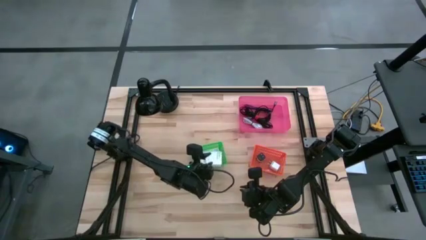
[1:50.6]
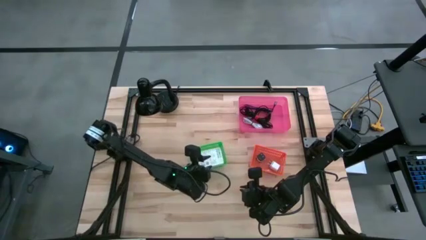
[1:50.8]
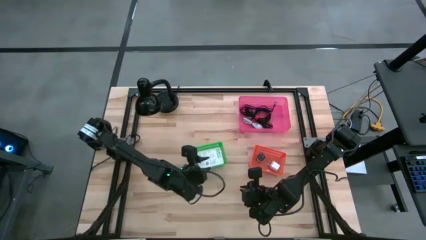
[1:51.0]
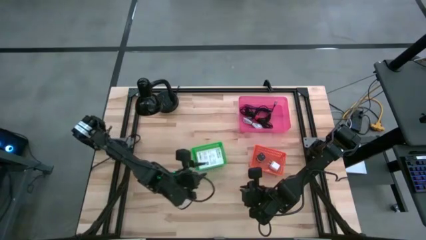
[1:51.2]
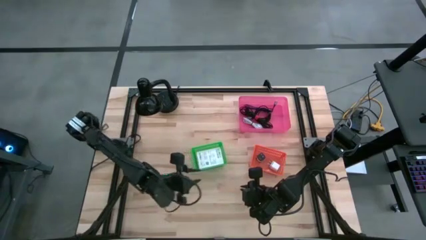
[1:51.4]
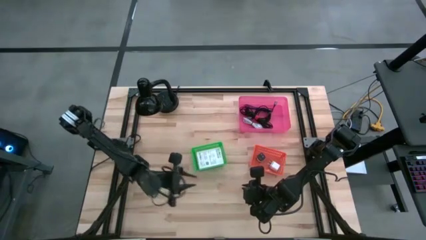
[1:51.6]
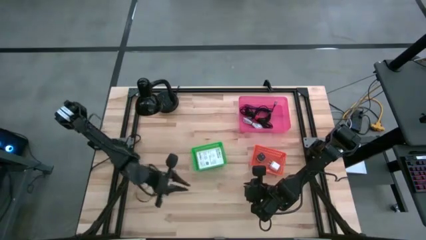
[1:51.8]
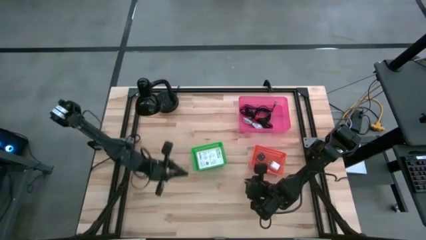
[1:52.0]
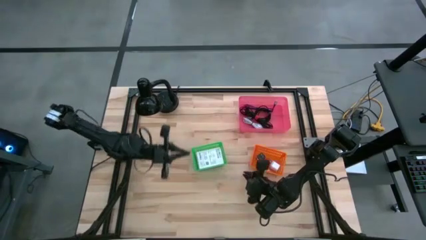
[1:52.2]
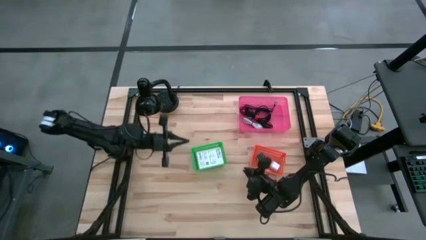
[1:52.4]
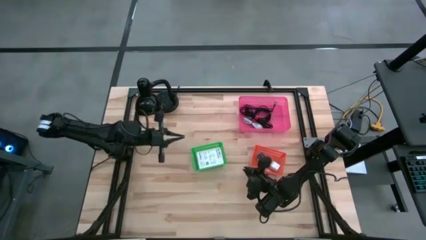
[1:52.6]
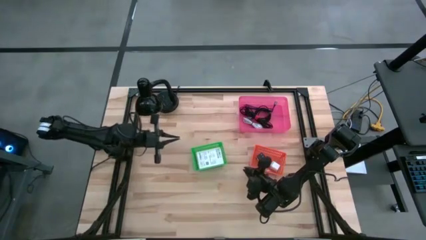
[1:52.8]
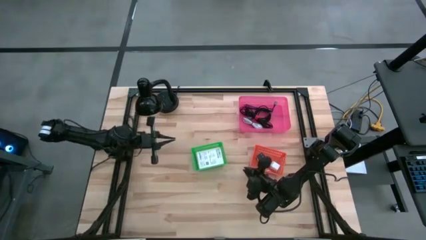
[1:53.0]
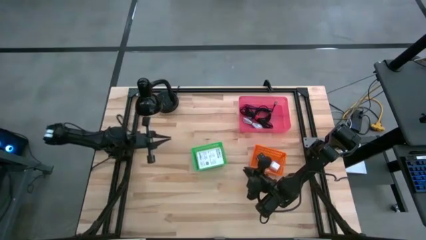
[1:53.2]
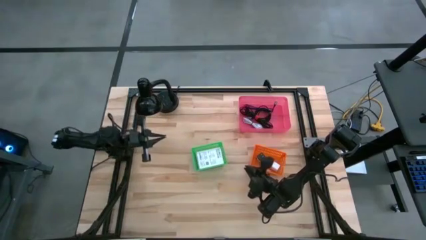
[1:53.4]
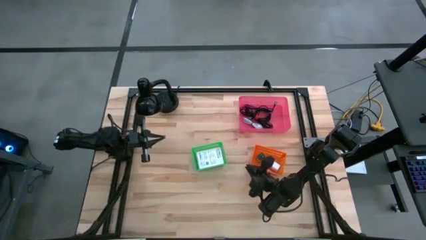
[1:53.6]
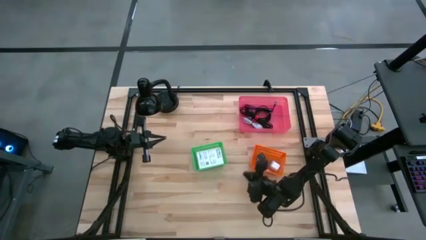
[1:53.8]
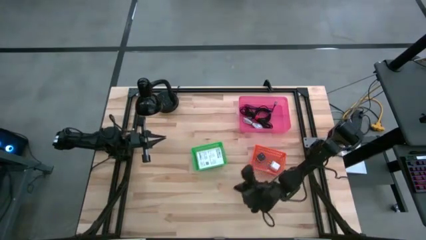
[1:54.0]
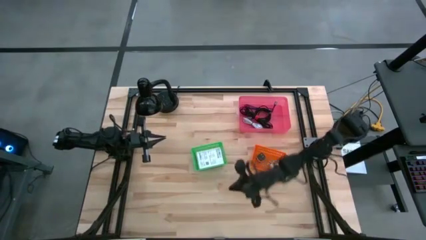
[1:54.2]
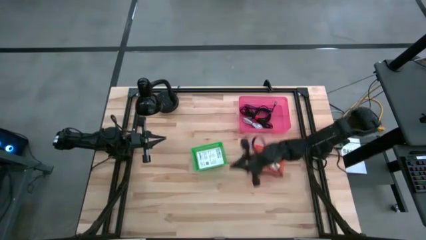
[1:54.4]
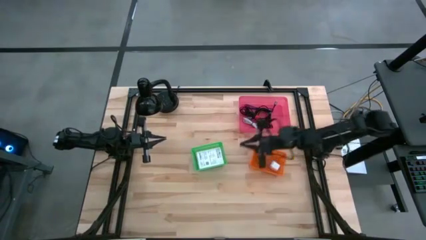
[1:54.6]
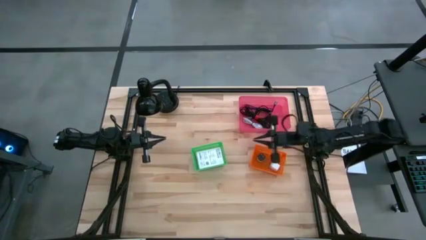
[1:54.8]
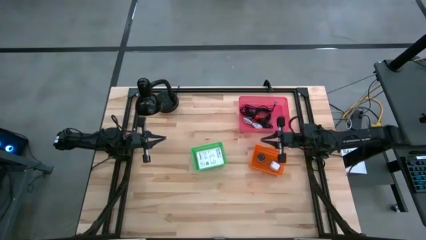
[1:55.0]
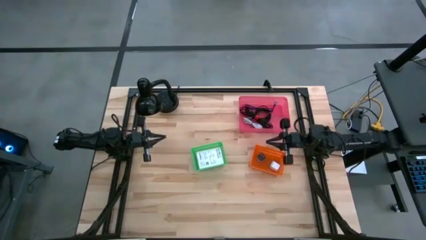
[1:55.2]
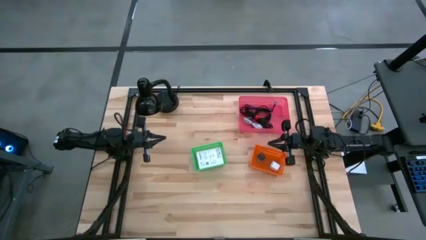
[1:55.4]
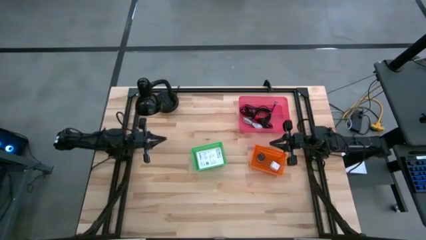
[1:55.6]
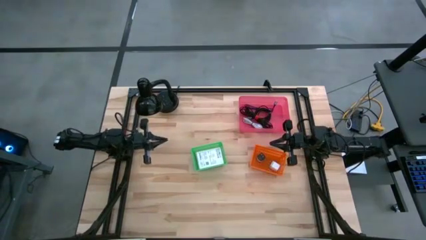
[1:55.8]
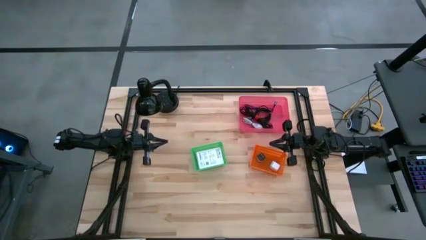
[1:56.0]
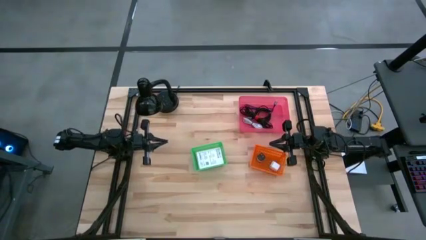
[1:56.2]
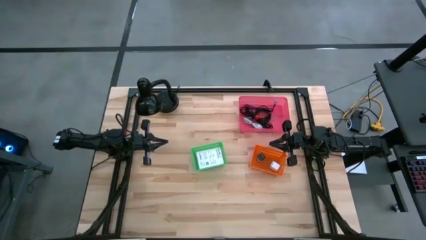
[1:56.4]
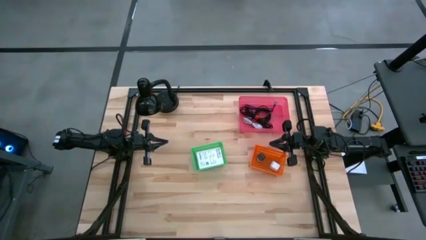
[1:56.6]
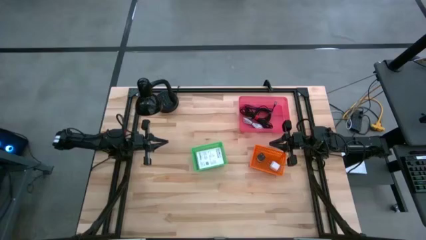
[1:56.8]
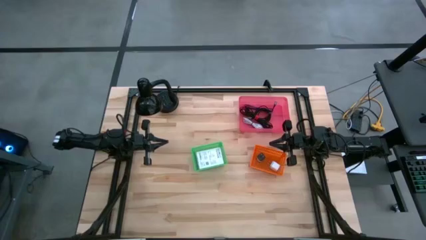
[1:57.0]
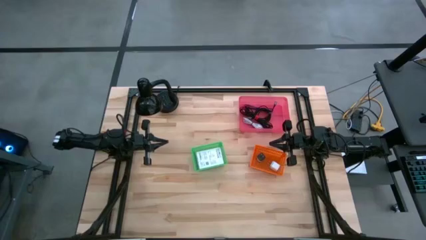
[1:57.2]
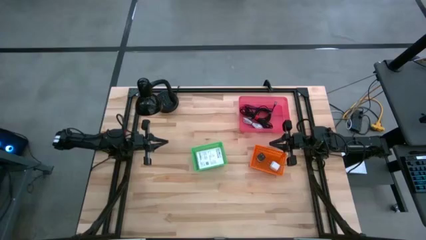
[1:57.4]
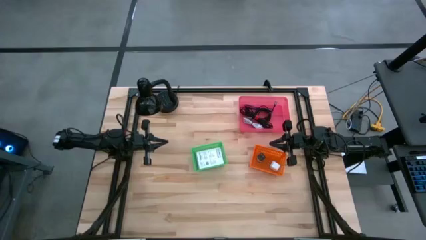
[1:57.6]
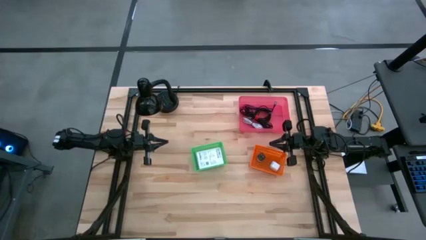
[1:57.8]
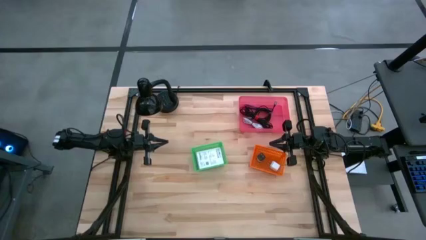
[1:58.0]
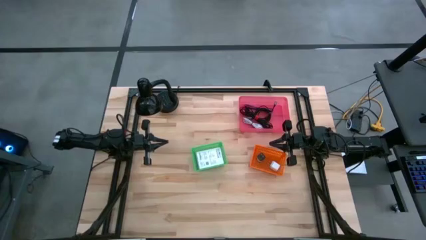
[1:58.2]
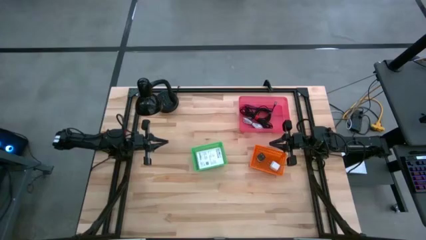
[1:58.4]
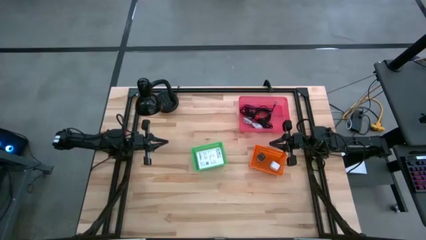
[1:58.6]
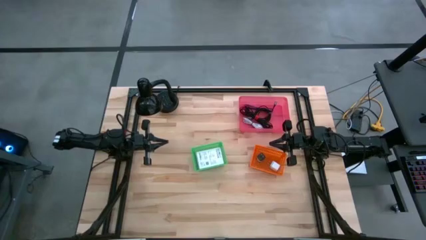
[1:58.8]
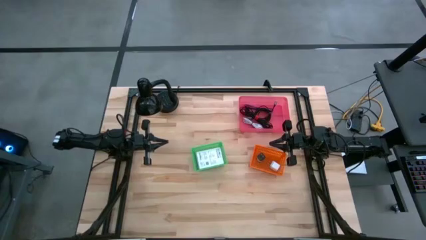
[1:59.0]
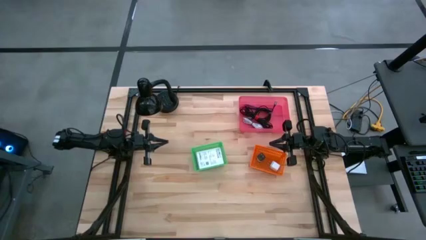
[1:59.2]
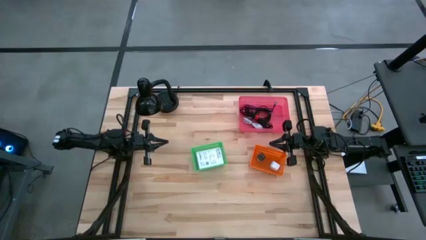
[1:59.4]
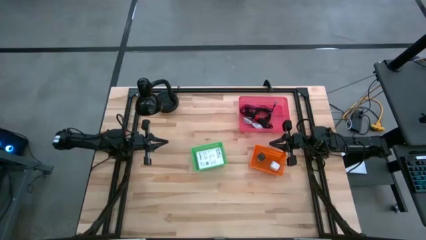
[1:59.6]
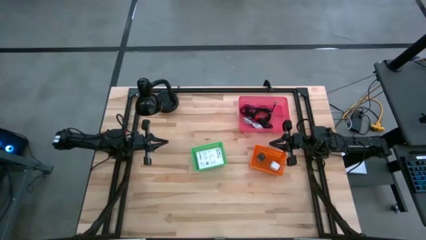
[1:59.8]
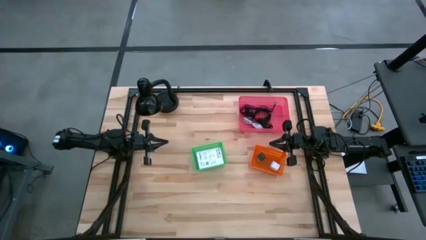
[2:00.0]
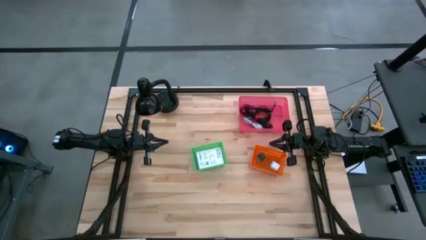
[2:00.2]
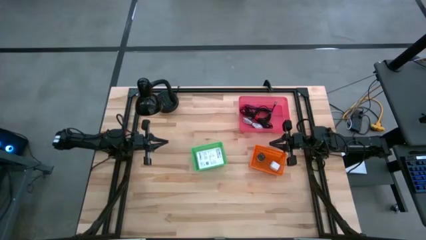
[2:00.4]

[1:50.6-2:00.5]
Task: Pick and place items into bin
Return to Home Position

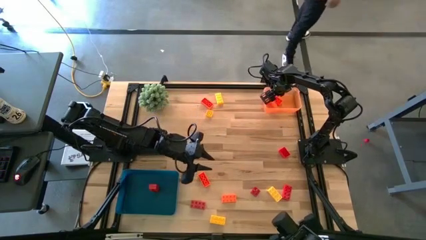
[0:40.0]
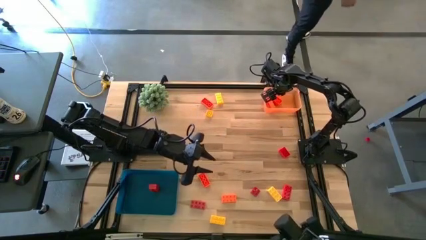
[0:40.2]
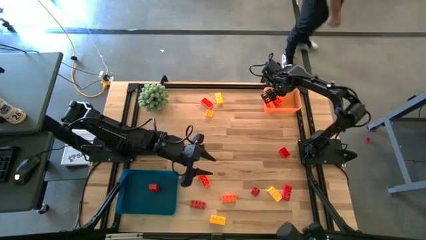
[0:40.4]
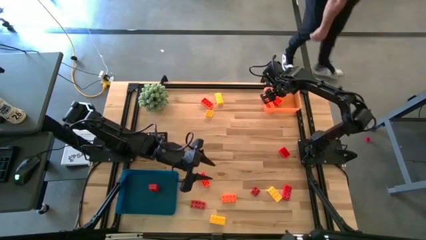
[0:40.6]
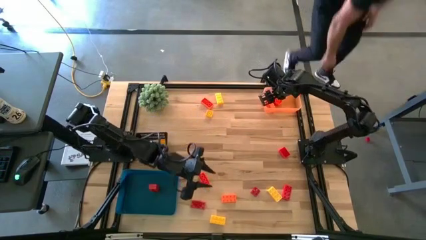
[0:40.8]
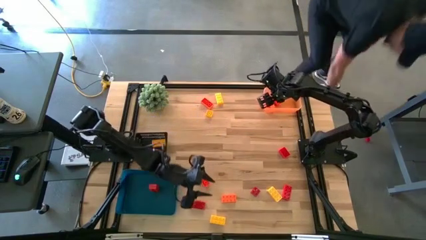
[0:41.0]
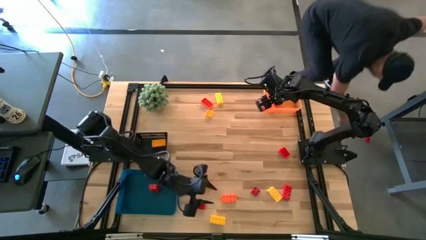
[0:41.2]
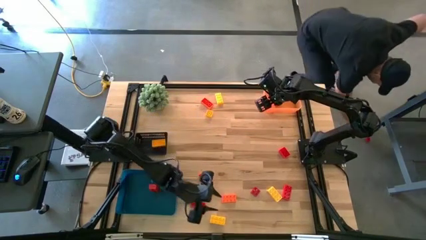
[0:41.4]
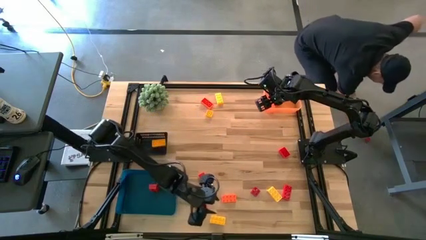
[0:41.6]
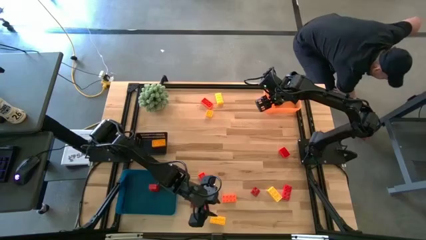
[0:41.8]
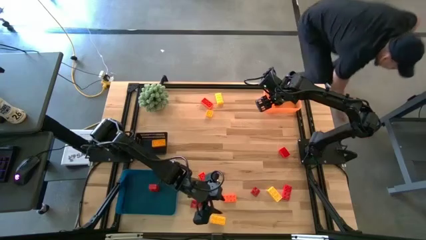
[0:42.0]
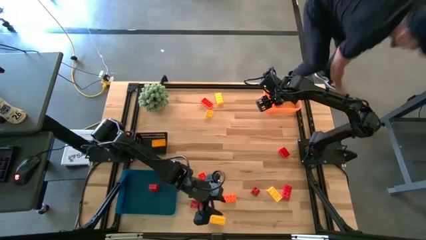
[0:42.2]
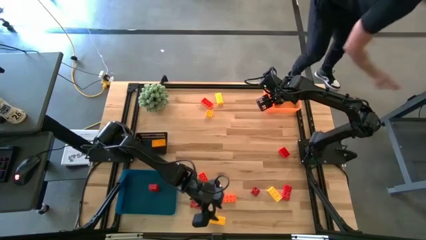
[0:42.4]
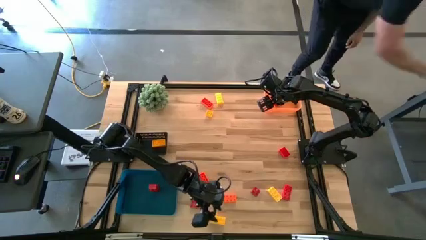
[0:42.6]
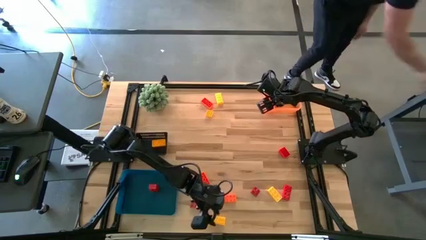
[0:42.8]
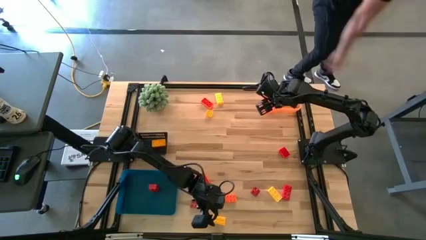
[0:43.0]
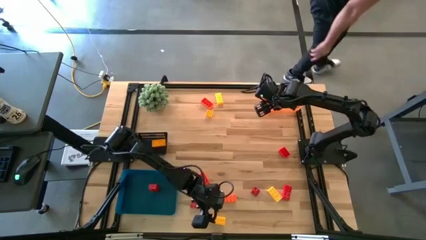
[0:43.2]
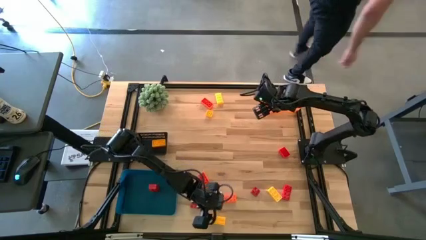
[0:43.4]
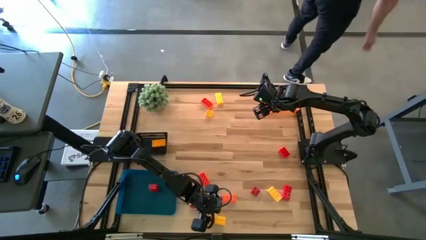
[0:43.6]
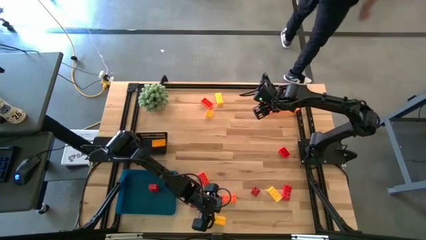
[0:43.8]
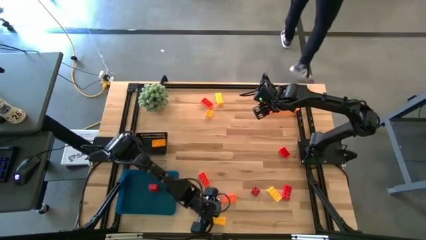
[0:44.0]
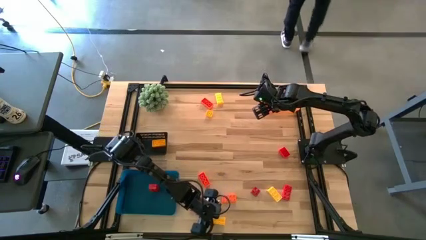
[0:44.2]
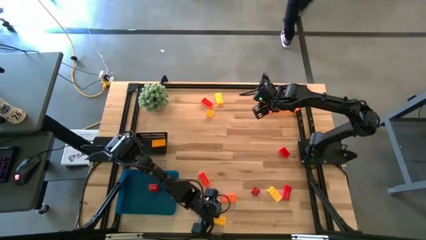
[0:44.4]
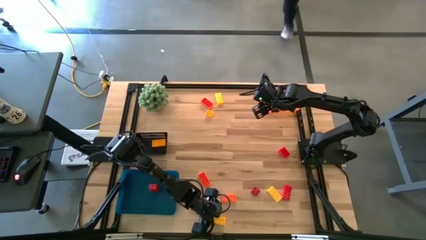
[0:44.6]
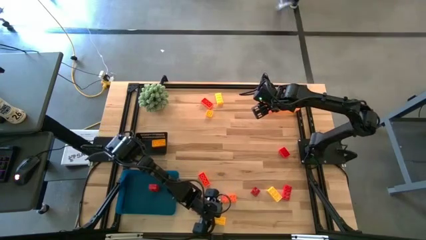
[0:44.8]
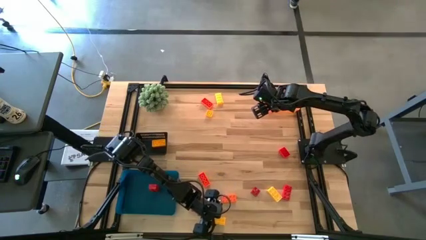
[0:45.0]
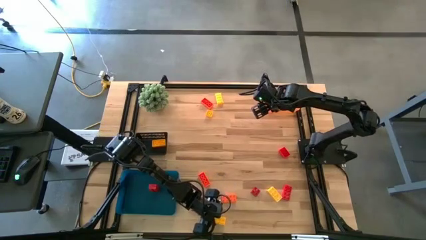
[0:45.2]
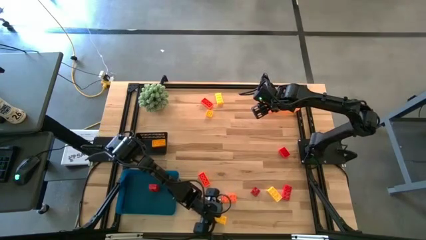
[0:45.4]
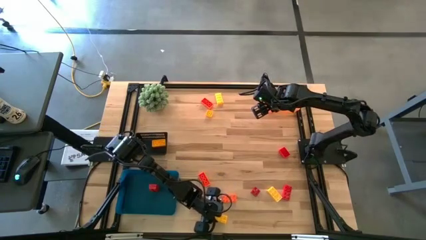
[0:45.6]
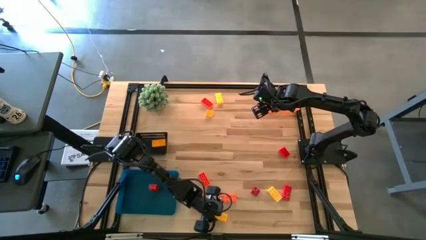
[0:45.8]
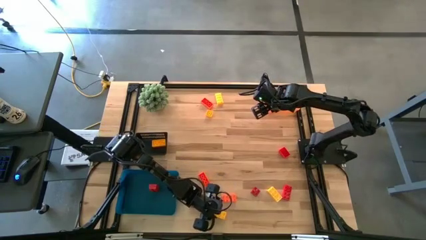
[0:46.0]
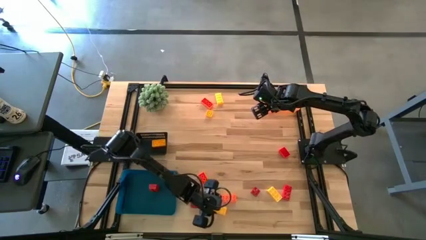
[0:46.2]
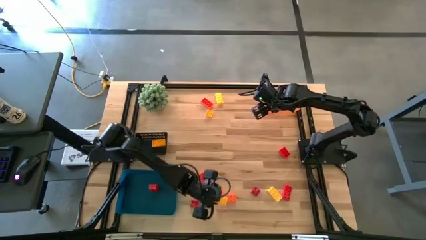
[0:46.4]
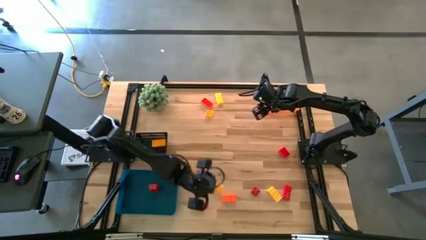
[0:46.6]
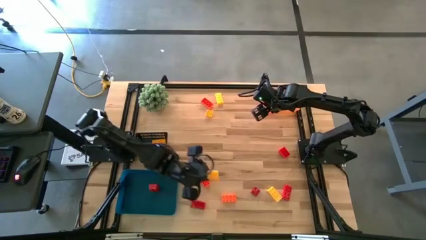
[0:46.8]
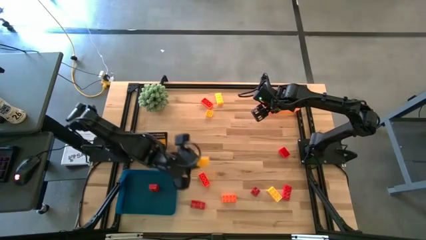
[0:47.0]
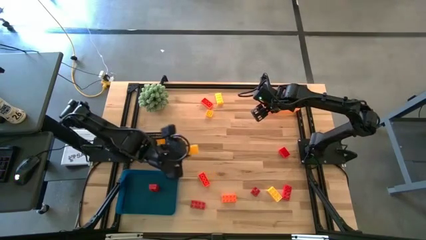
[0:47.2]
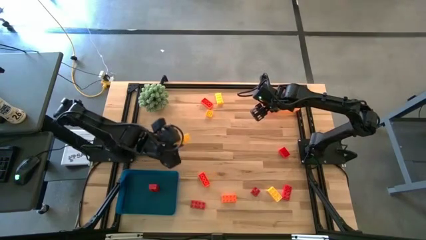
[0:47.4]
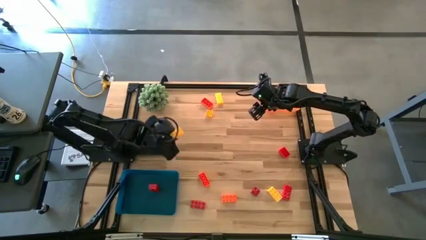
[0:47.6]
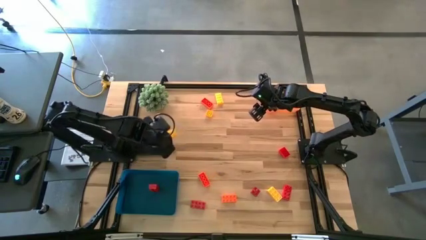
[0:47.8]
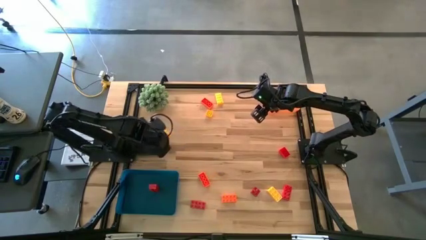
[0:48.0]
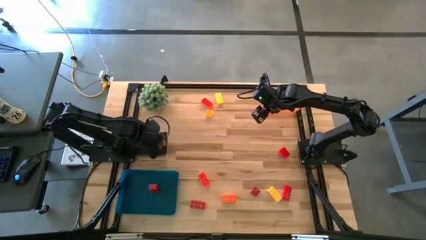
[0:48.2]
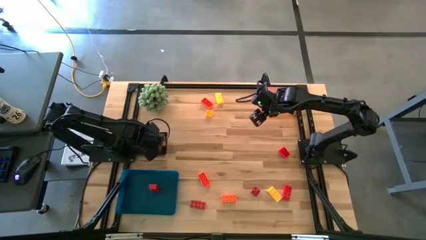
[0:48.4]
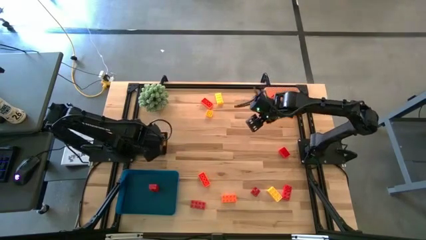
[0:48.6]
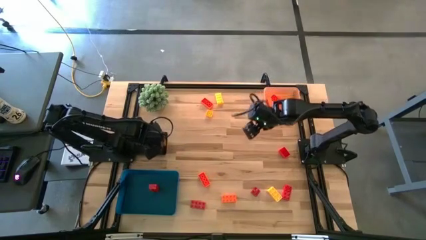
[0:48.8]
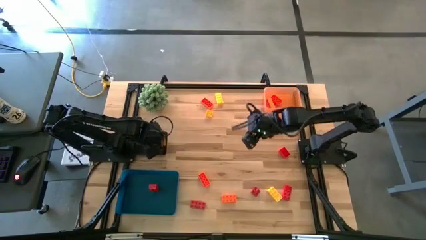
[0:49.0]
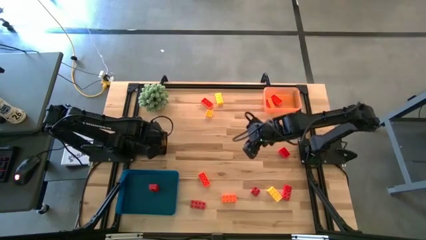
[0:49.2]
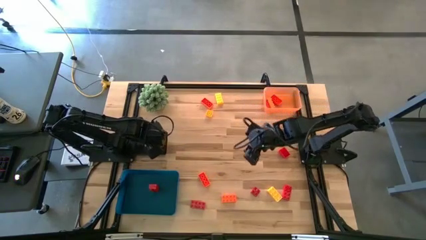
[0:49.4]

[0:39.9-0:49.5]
Task: Sort & place blocks by color
Put the yellow game piece into the black bin
